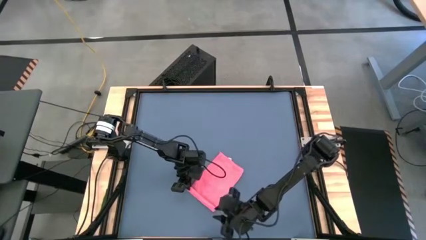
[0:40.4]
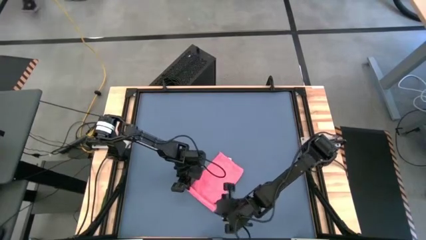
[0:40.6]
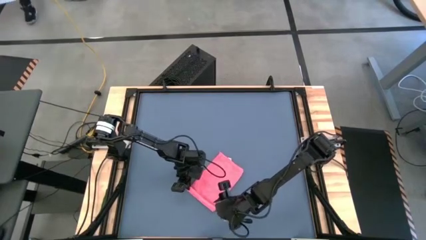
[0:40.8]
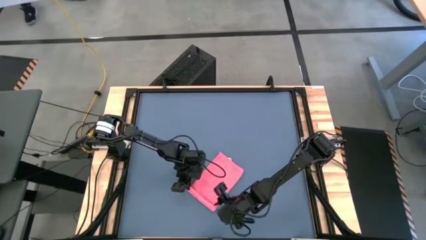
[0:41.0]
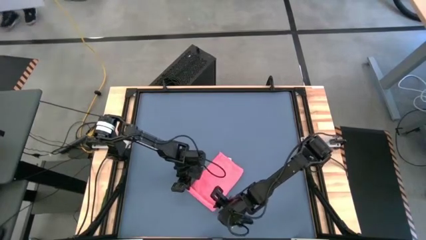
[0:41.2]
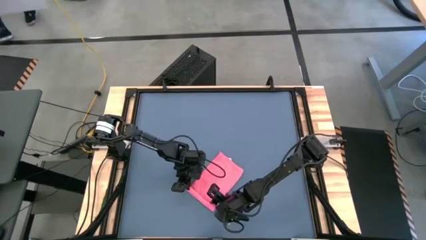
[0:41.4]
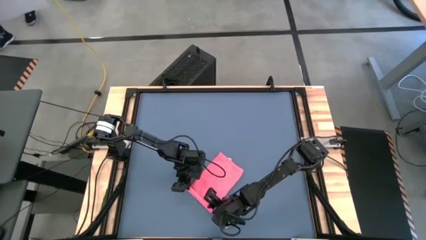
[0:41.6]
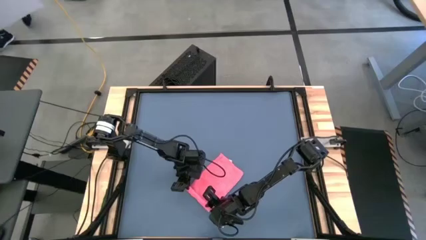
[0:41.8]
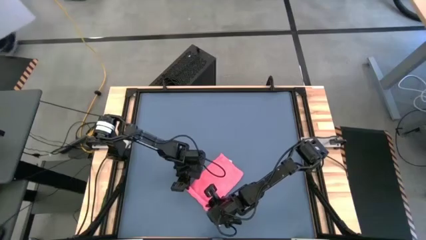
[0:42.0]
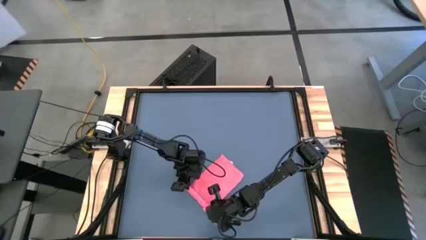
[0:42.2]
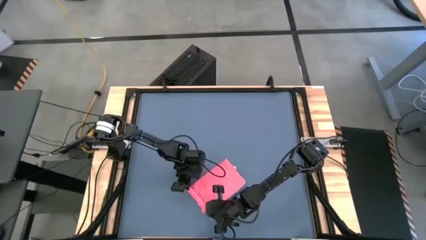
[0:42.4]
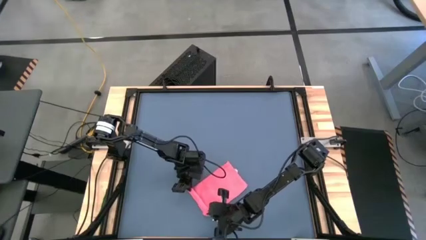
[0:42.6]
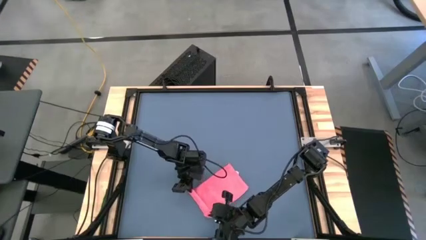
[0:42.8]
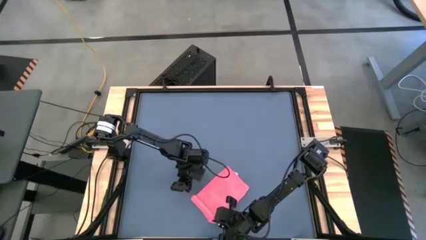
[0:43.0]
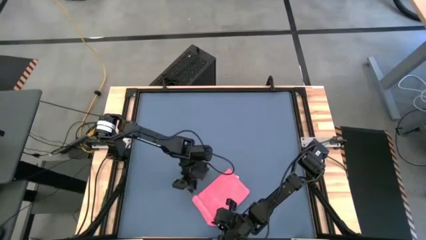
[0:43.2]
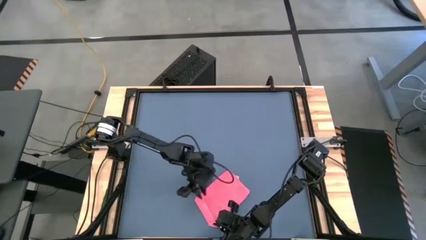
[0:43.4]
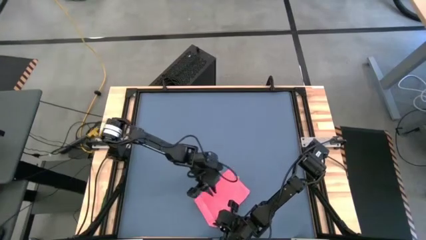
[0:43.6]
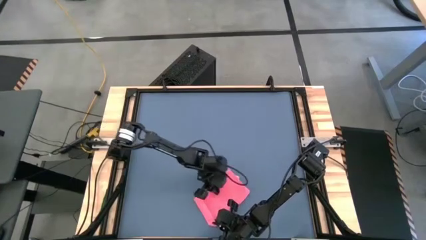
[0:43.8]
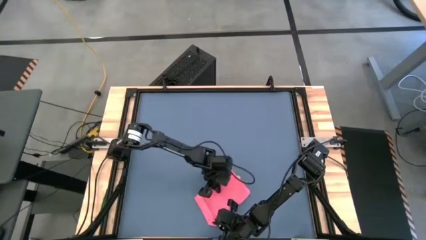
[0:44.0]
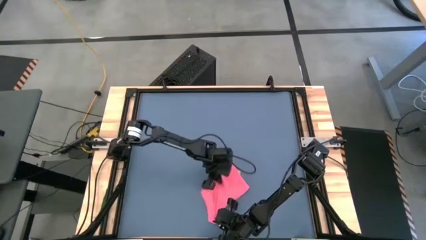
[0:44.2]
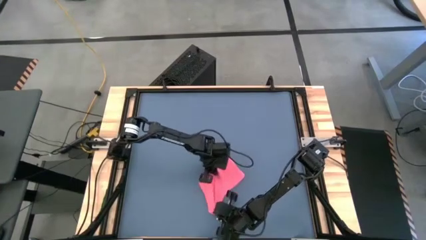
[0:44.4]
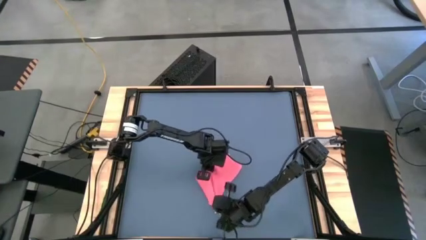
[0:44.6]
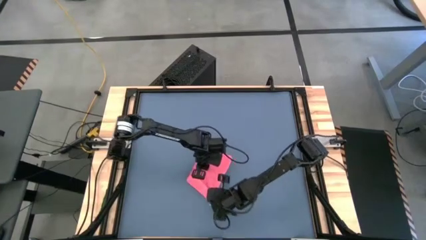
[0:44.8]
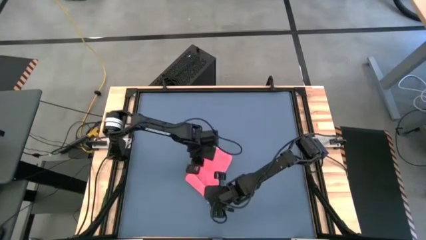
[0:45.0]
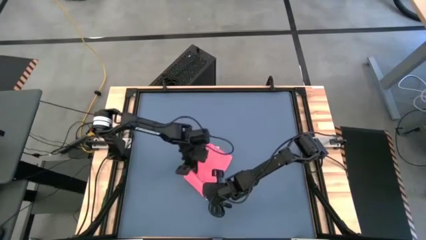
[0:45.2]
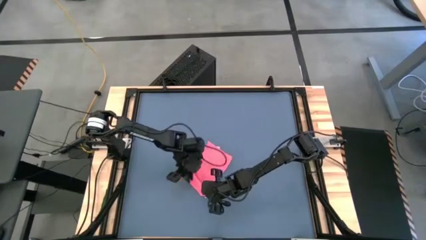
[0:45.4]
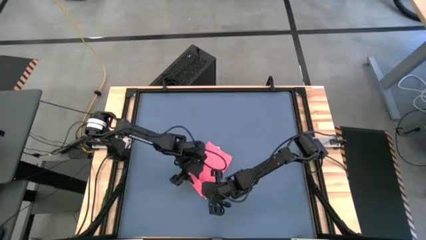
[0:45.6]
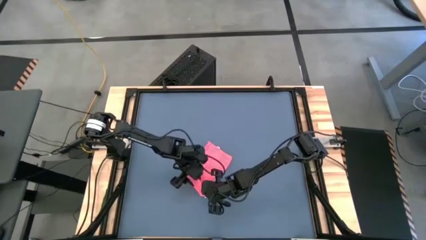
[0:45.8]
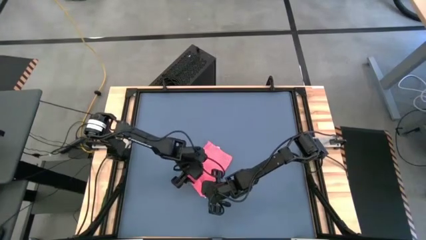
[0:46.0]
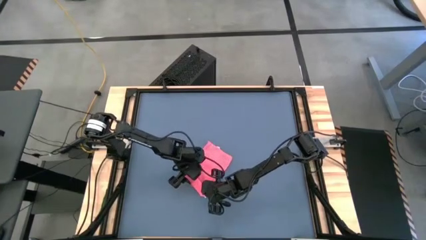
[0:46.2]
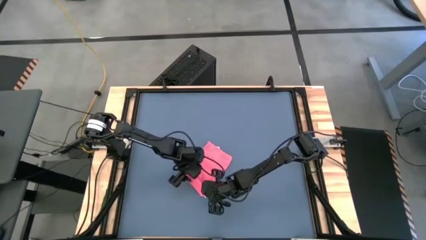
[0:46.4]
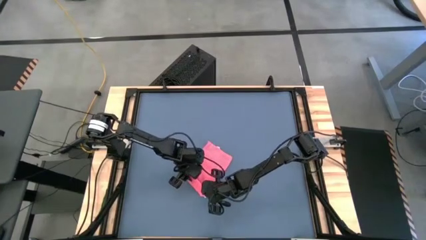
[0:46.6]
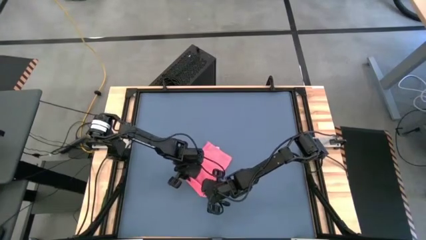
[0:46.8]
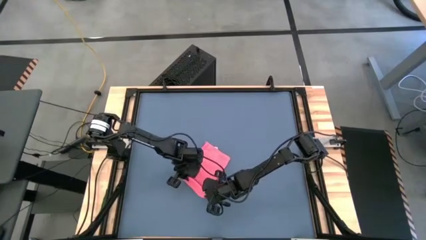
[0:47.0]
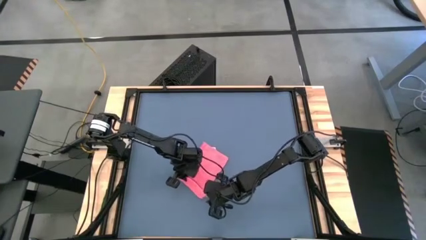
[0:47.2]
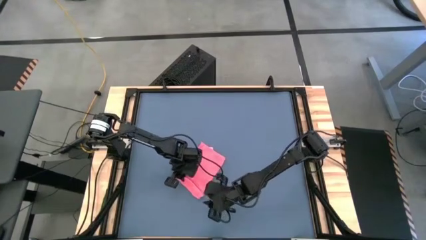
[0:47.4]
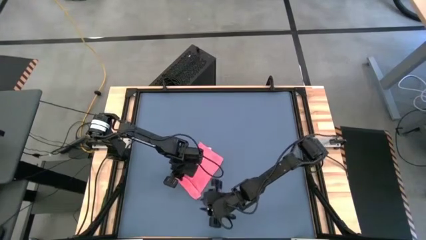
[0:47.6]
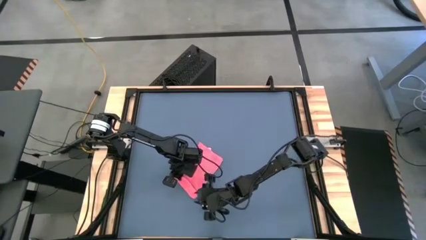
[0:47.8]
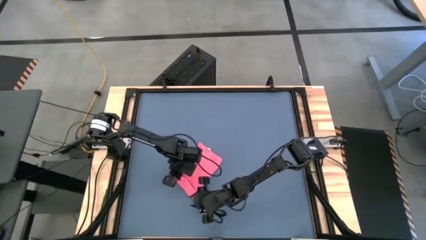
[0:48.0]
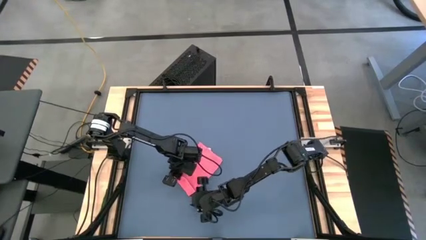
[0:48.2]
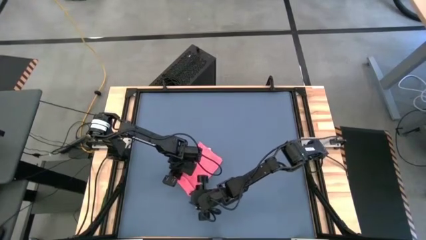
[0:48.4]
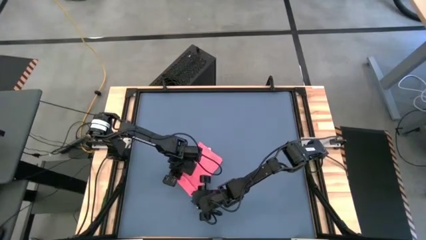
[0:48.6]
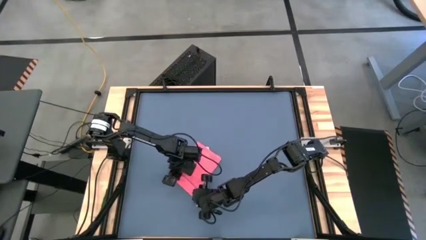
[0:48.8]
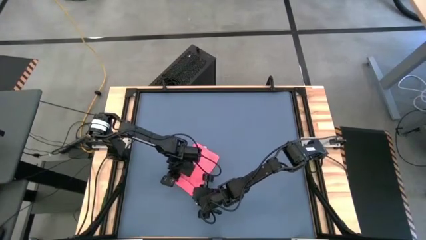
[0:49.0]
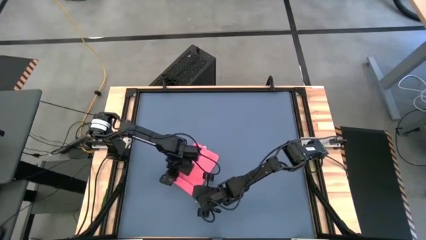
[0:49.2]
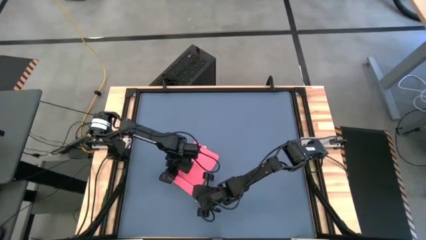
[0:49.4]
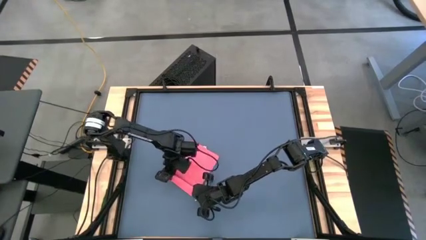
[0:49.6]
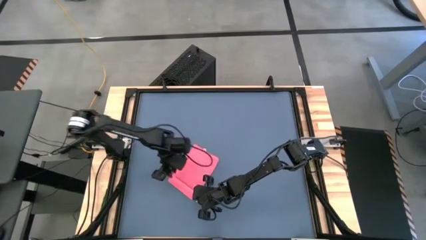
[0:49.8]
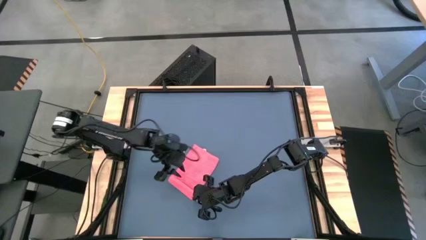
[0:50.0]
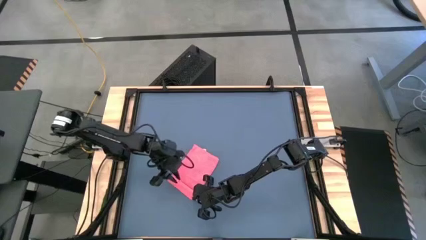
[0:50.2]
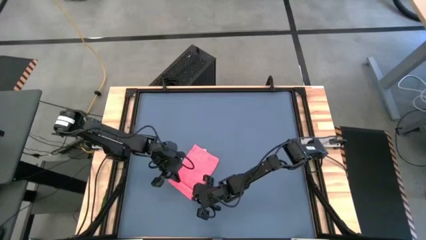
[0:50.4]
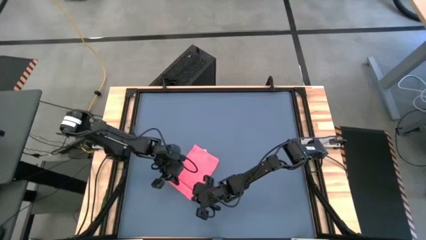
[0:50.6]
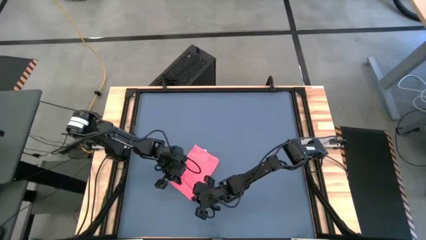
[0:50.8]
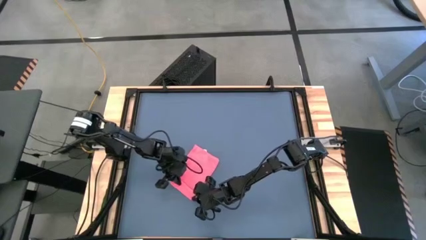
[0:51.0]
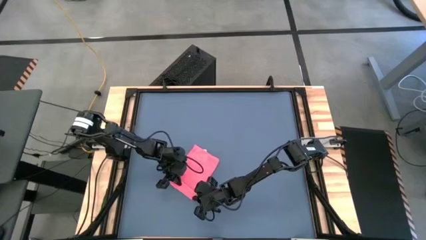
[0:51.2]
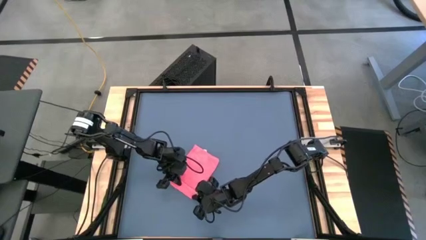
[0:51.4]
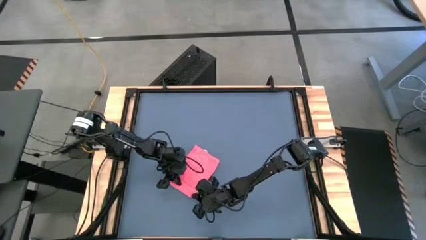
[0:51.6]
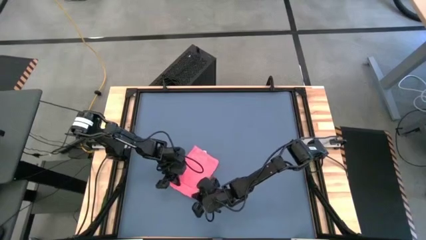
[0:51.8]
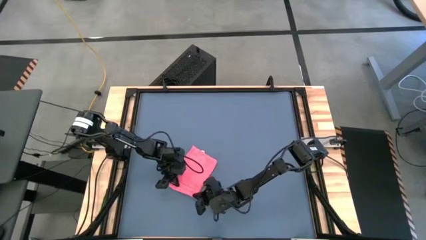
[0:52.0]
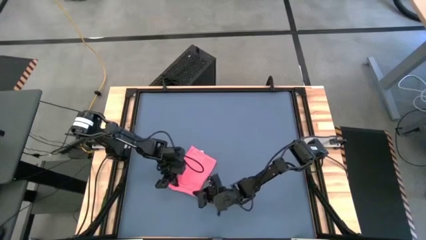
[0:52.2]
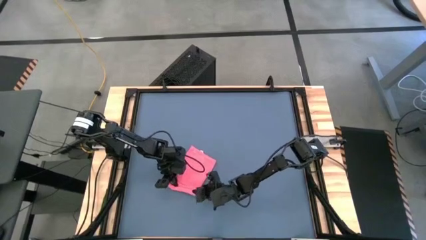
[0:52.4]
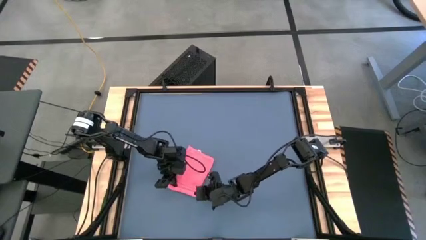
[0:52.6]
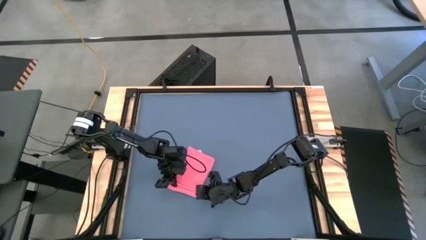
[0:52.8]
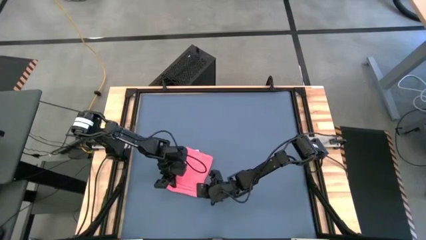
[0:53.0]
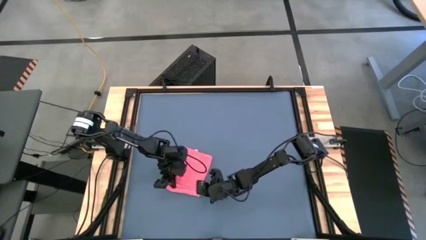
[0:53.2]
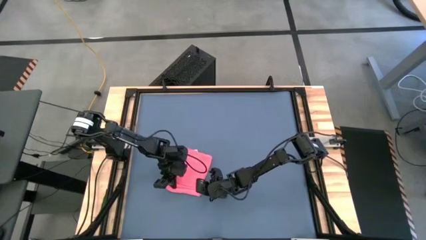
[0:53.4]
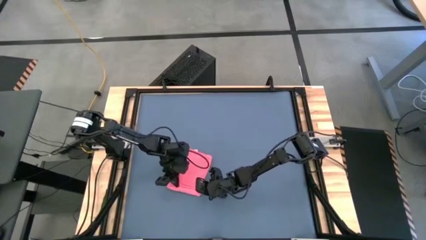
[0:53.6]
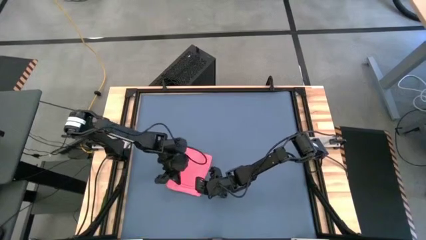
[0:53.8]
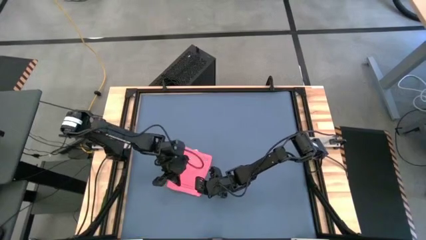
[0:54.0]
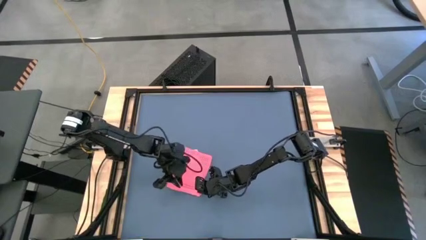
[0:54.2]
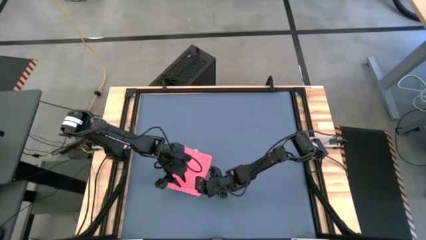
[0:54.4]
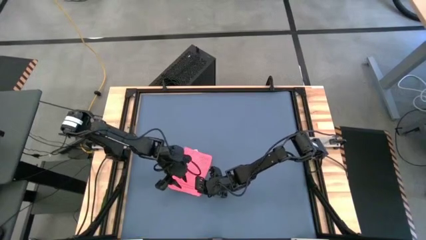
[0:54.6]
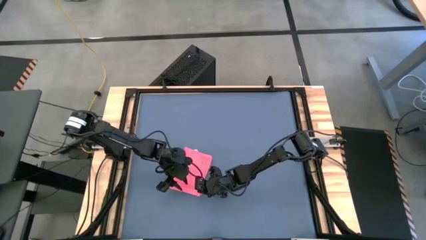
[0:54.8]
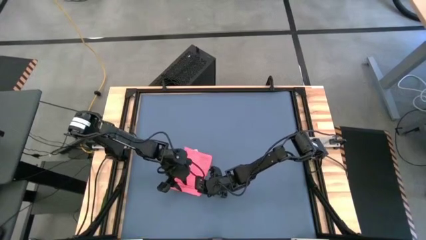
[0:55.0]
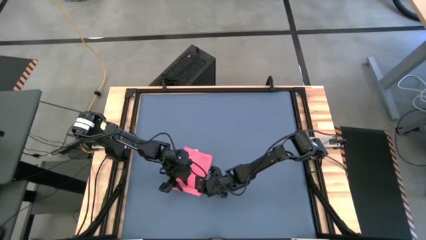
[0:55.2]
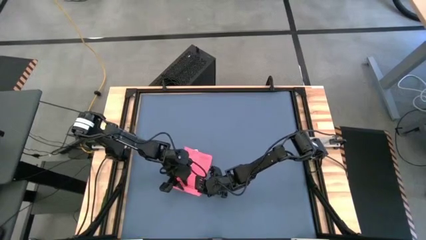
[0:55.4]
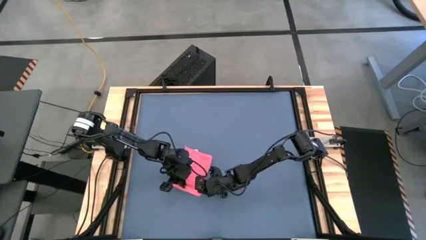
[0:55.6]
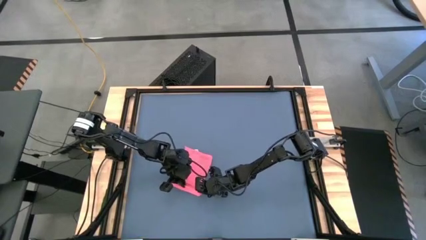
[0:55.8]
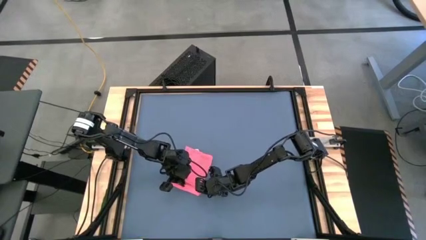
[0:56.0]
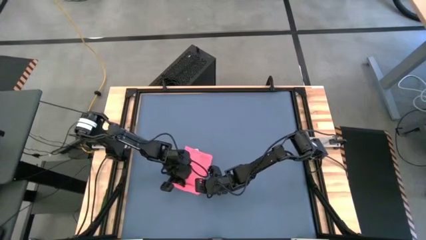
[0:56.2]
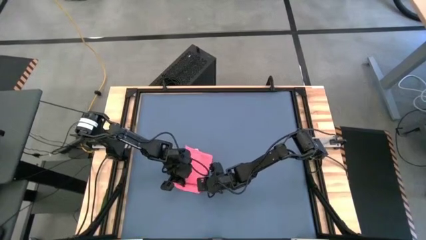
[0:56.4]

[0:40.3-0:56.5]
Task: Roll towel
Roll the red microfiber cloth
